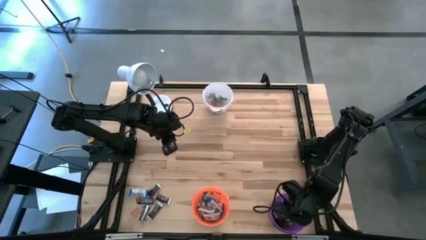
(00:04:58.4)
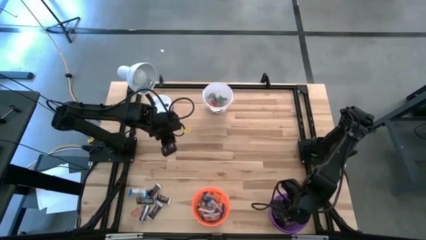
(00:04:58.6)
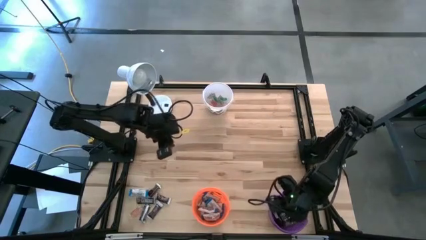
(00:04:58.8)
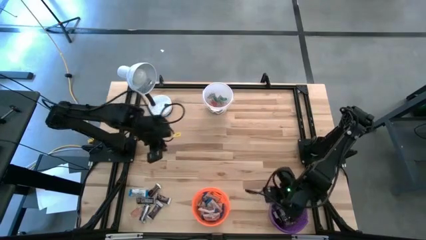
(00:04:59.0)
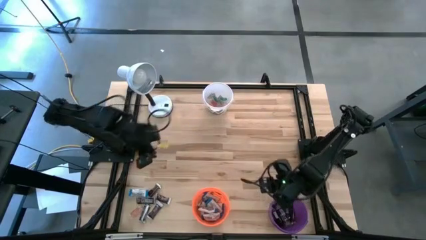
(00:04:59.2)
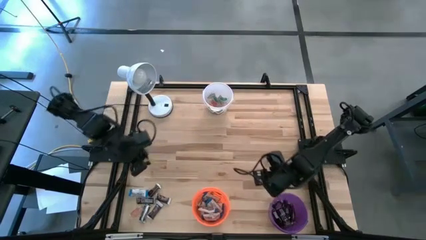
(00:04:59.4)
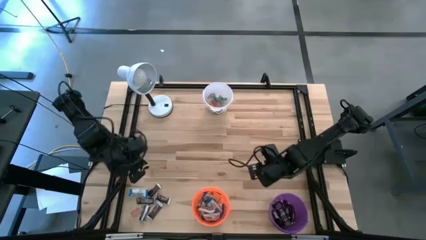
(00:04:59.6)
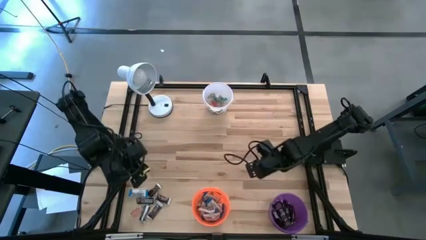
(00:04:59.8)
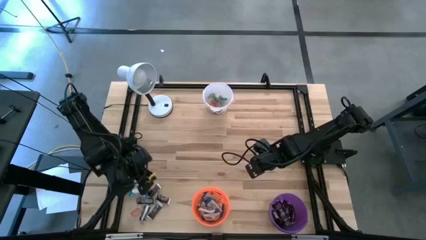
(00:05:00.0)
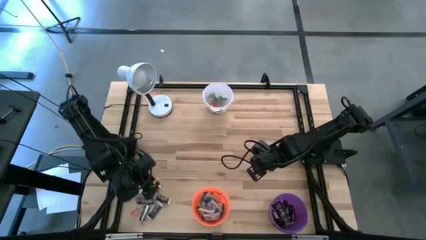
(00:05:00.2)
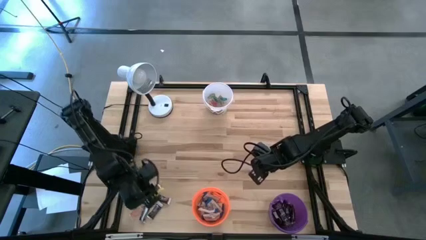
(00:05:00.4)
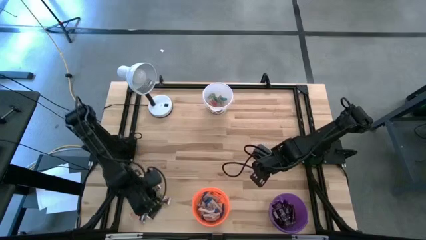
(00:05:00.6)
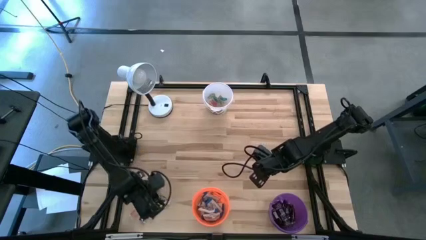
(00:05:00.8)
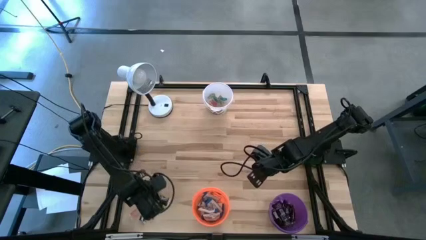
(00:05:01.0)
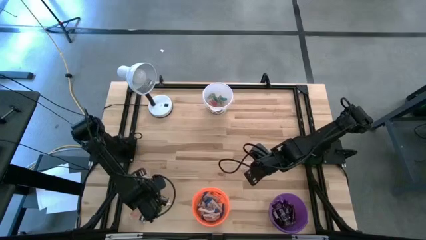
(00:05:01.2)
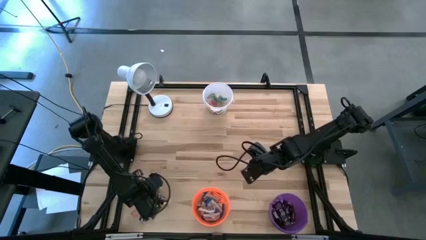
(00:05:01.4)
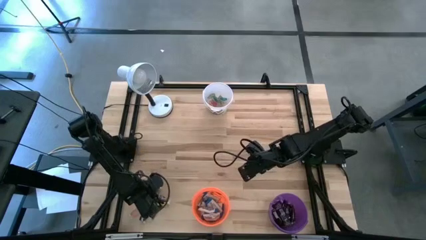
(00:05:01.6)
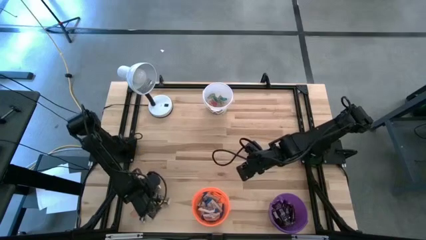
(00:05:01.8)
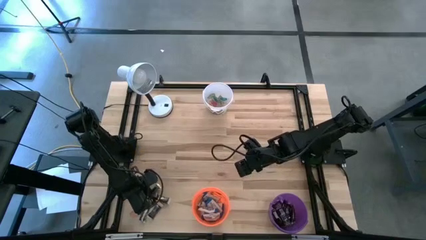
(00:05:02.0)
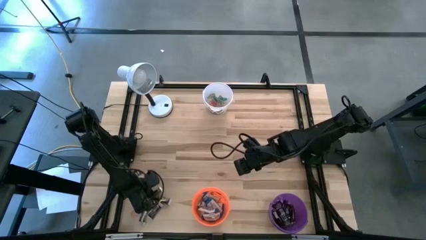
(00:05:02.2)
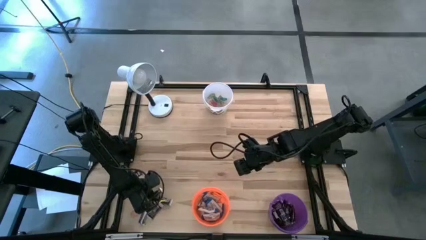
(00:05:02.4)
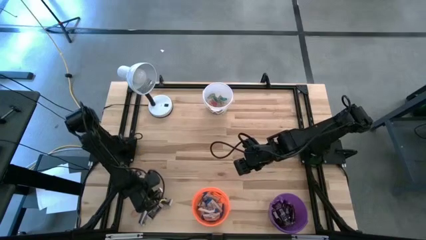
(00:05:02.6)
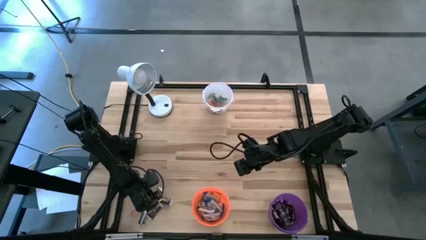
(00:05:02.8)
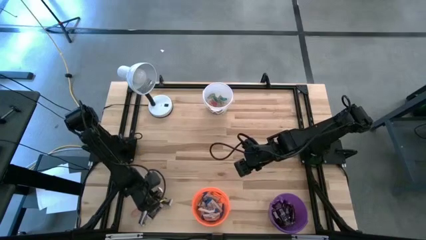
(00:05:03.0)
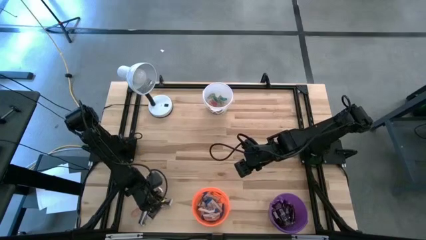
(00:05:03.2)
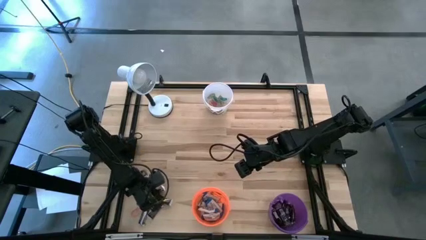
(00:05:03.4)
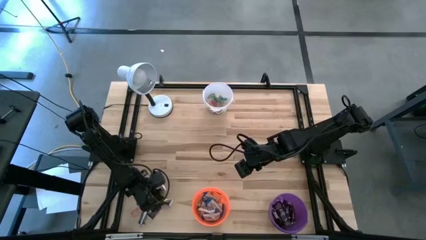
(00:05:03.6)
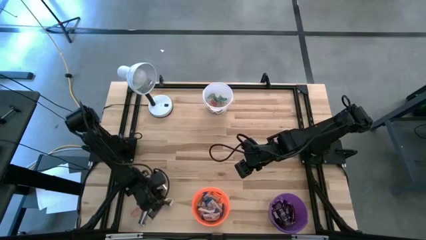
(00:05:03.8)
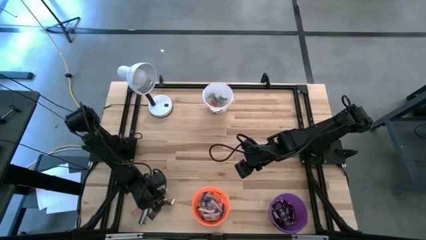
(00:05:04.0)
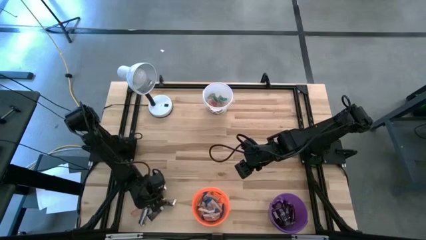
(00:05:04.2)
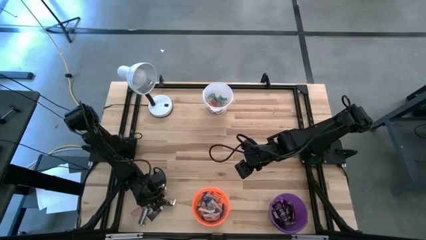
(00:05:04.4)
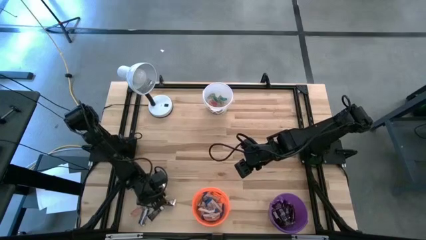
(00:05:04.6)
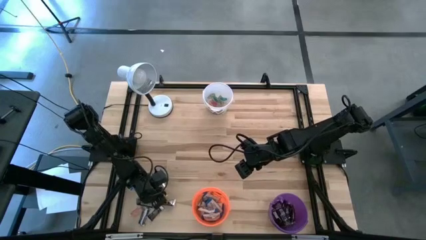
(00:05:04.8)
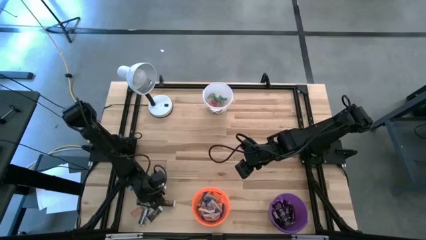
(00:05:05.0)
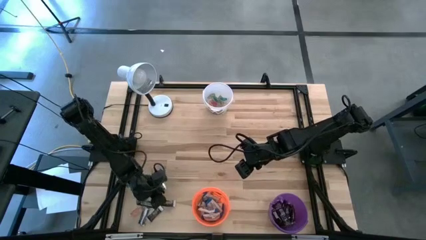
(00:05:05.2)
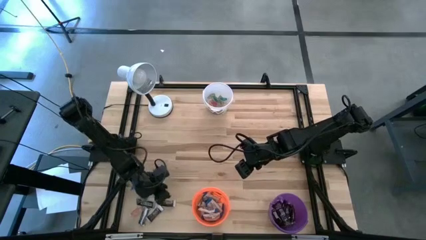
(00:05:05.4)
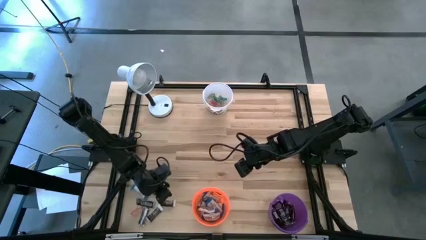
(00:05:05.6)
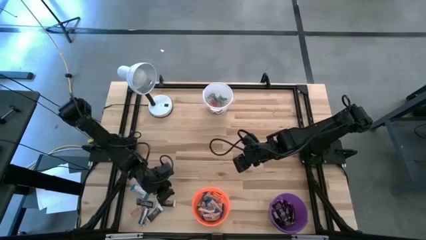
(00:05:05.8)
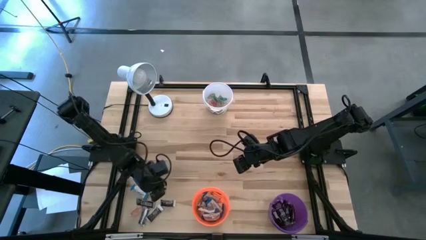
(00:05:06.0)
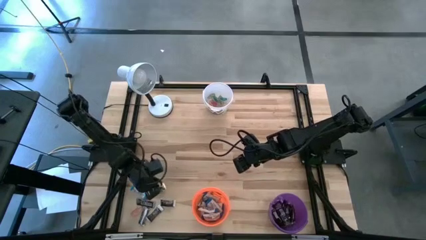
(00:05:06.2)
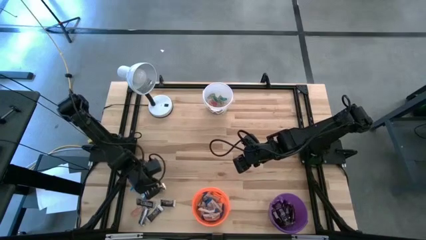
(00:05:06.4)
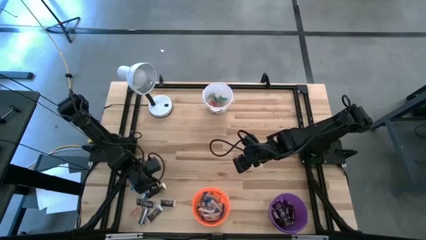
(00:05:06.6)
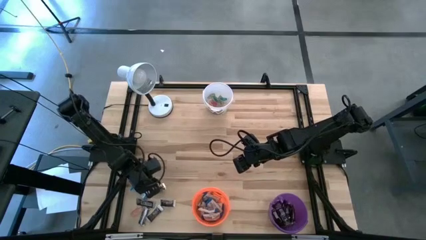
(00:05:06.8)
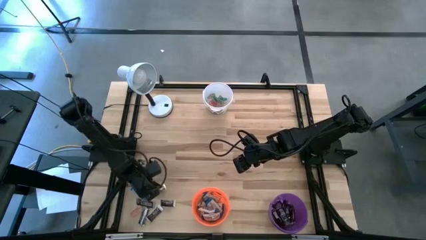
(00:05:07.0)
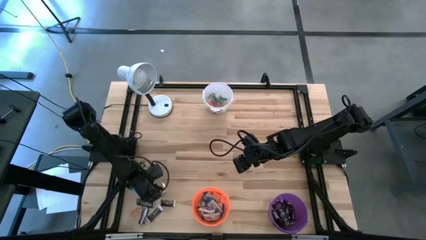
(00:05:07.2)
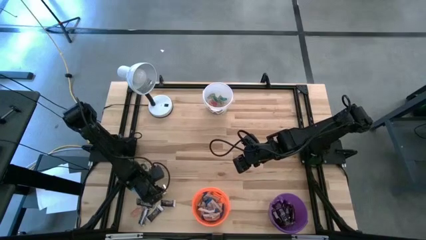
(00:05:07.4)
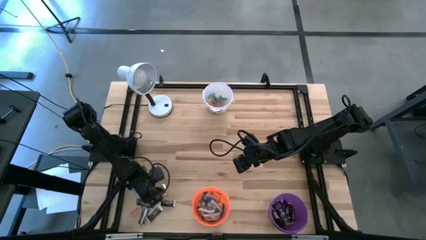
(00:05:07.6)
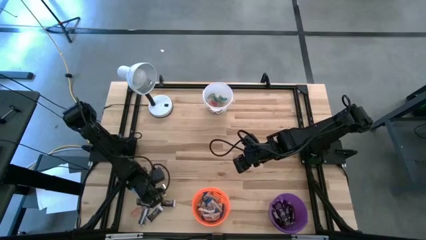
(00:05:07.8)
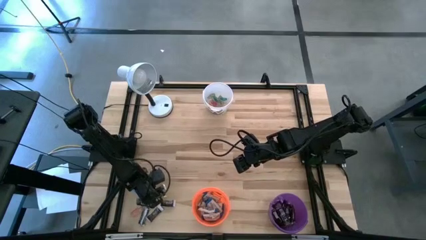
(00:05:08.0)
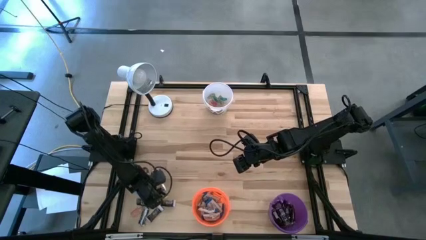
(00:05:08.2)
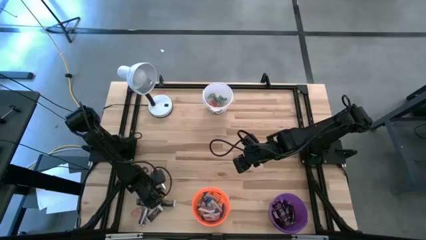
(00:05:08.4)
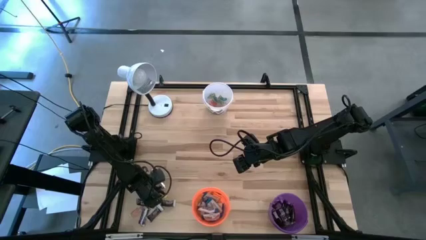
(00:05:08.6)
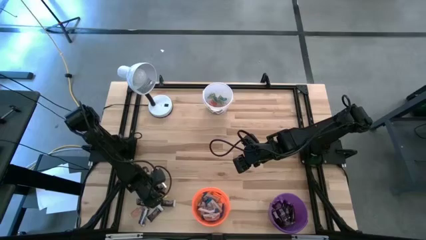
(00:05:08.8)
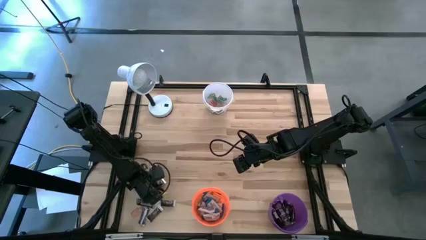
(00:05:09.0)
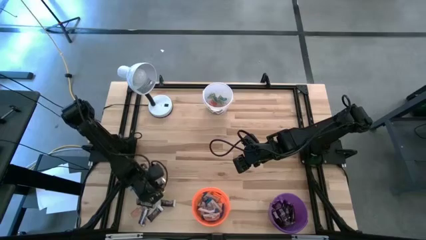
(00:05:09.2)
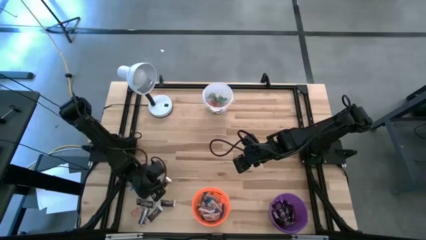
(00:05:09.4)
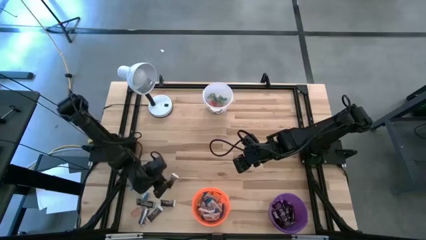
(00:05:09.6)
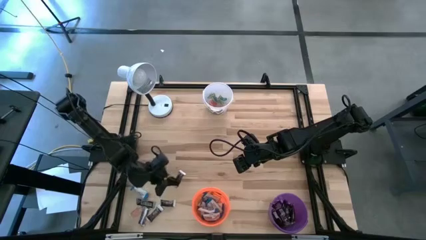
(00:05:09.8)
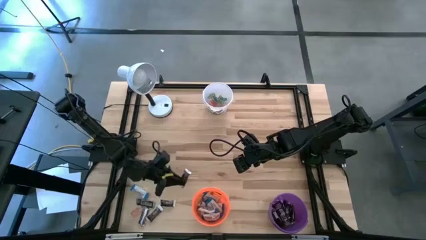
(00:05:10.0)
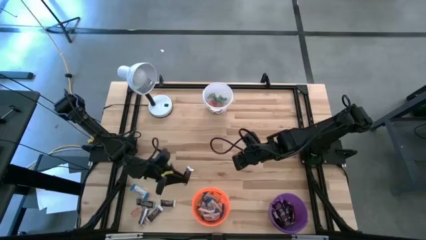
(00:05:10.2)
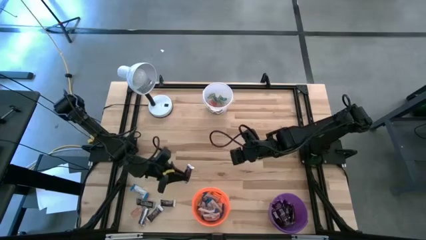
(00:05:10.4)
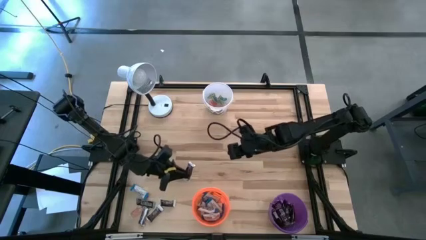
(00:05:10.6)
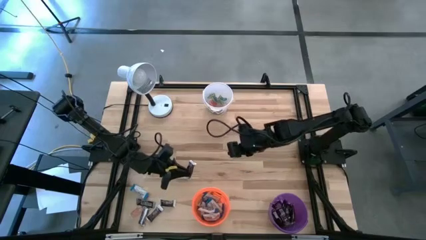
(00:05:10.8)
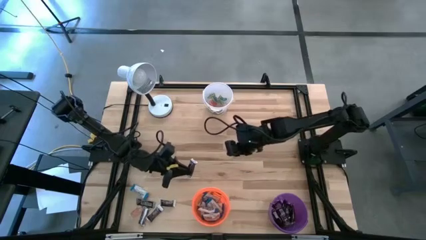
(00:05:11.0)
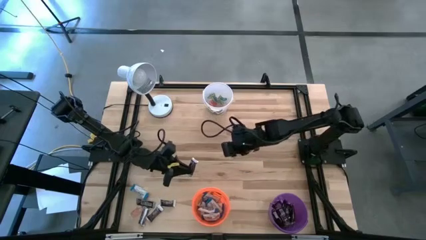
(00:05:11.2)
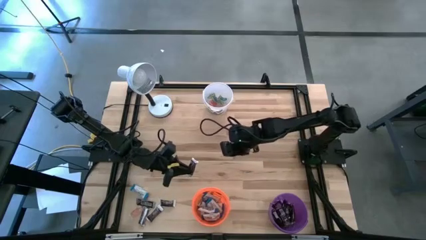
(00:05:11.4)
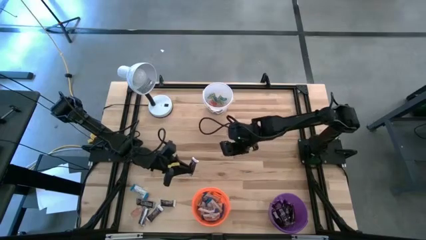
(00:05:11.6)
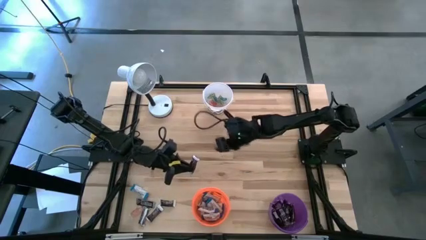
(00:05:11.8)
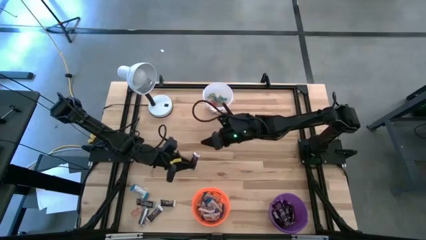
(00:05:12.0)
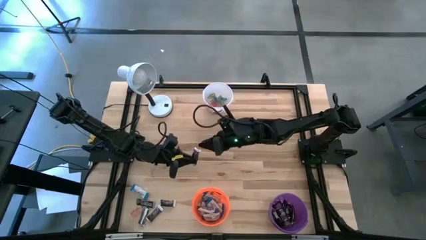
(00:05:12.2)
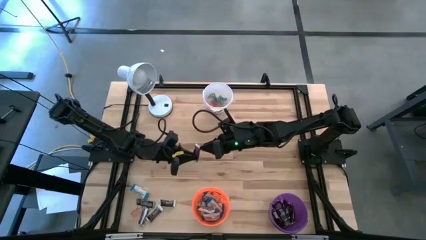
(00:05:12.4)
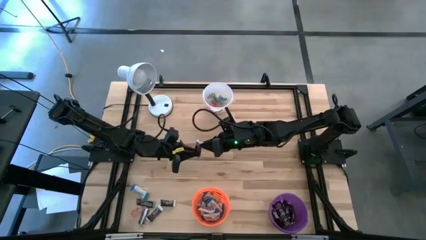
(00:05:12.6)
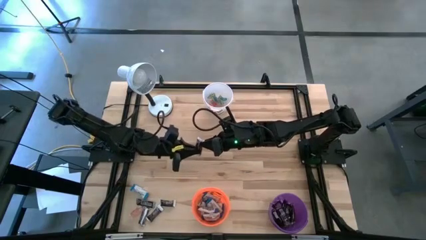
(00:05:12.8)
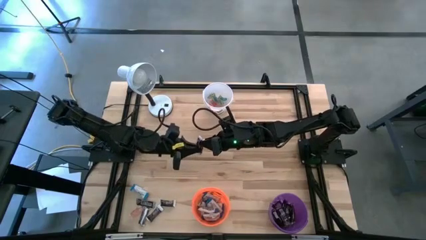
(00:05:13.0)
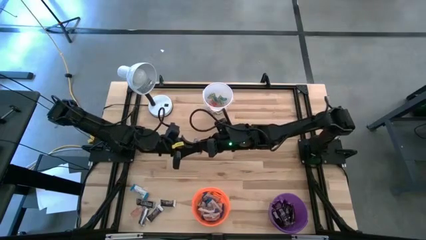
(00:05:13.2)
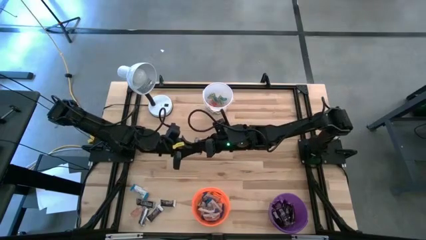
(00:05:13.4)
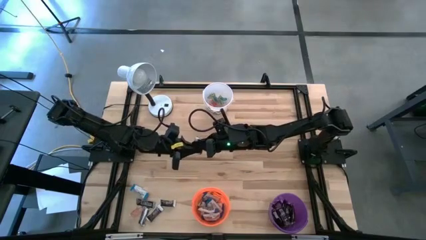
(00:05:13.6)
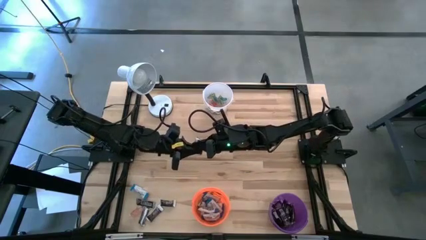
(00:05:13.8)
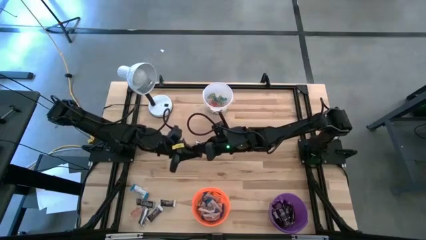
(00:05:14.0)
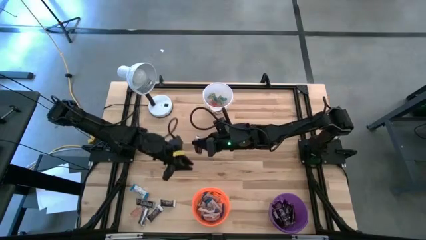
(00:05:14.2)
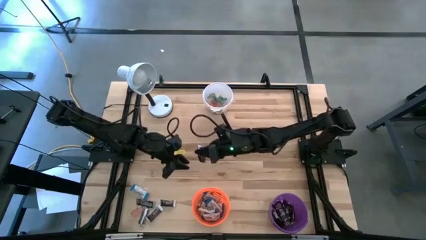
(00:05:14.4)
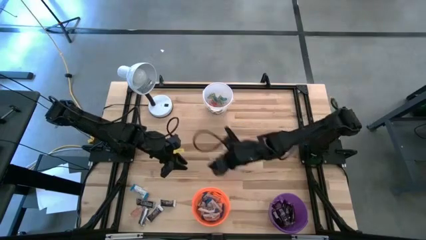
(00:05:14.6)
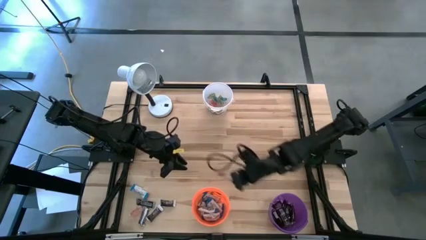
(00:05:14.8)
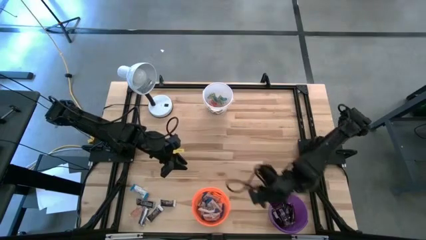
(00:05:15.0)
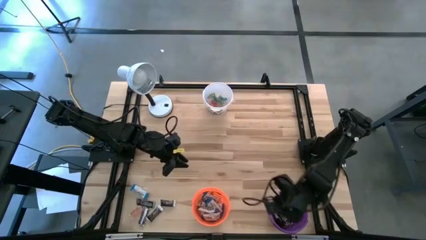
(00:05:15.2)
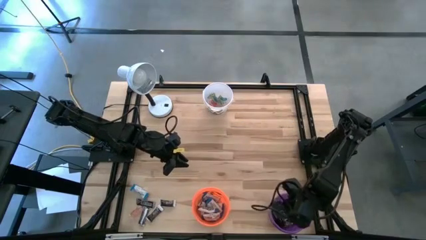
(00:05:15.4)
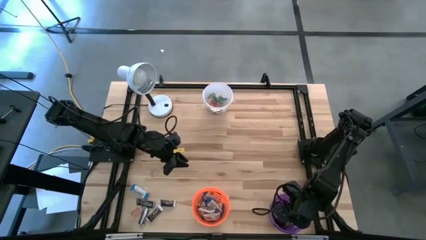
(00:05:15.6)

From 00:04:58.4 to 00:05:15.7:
Task: Organize candy in baskets
Put the dark brown chocolate bar into the dark purple bucket
